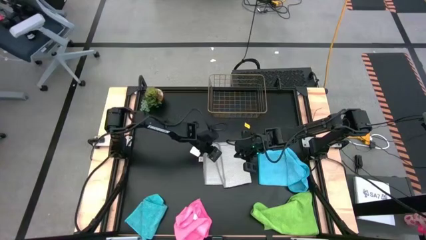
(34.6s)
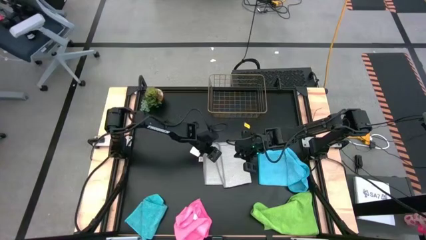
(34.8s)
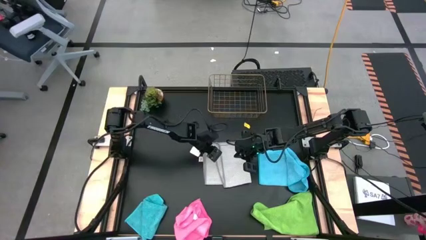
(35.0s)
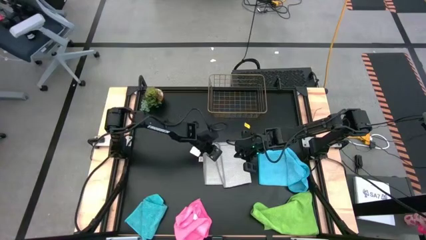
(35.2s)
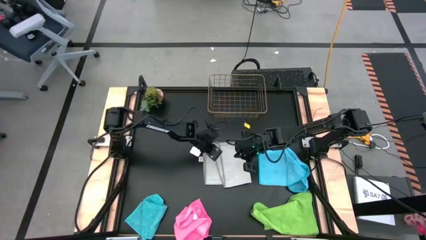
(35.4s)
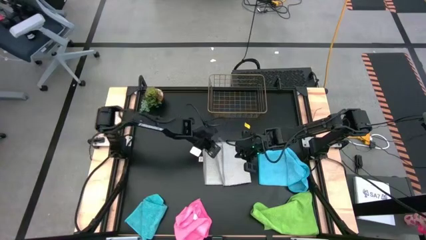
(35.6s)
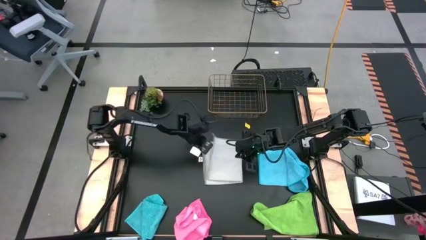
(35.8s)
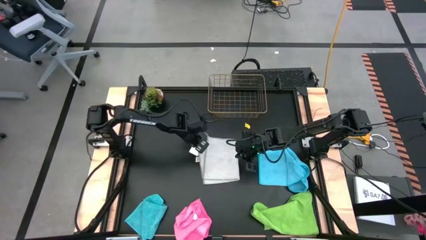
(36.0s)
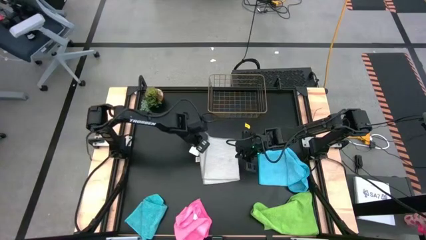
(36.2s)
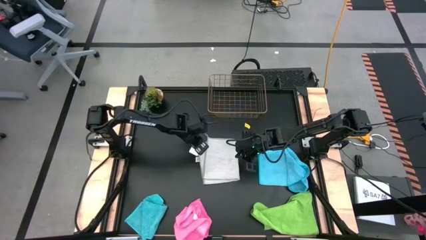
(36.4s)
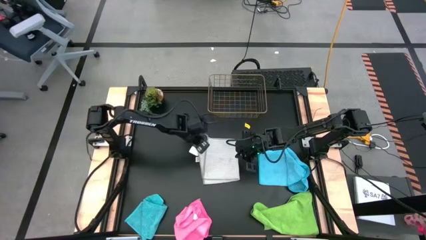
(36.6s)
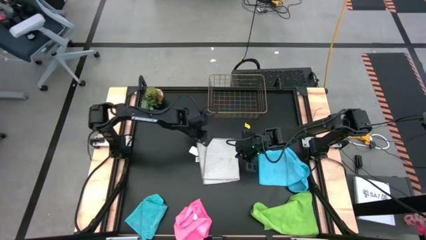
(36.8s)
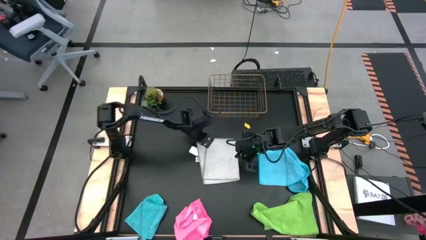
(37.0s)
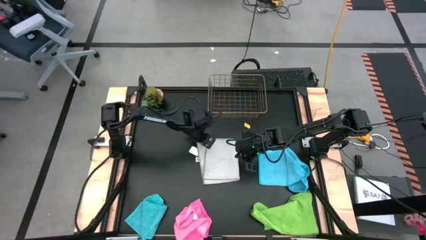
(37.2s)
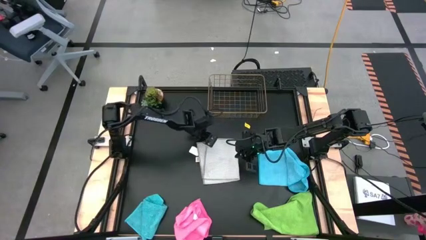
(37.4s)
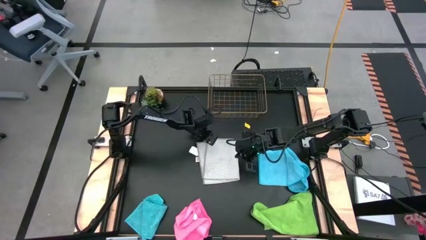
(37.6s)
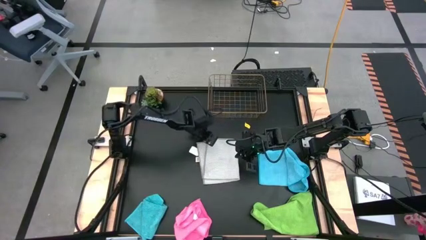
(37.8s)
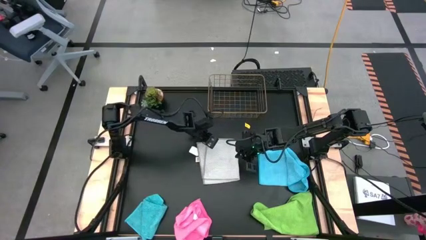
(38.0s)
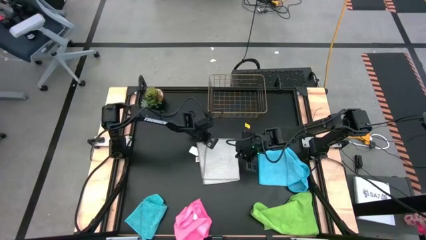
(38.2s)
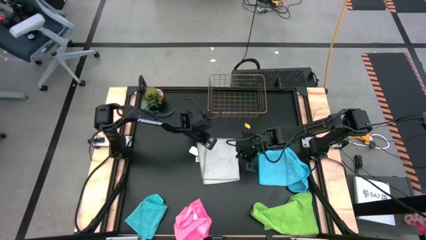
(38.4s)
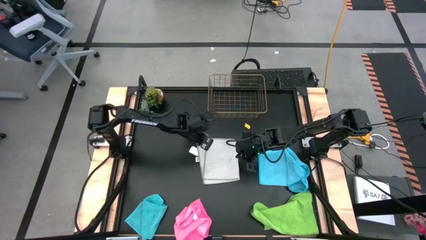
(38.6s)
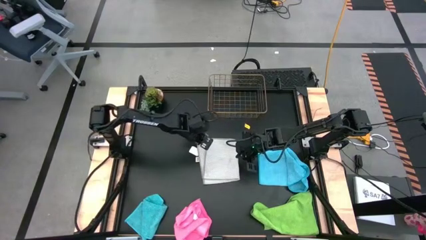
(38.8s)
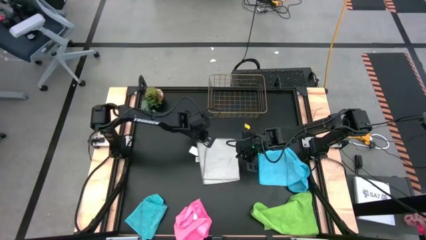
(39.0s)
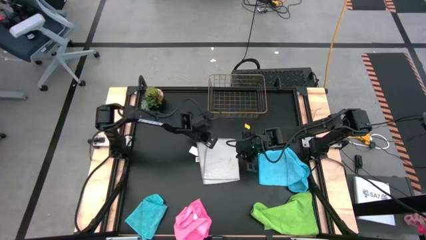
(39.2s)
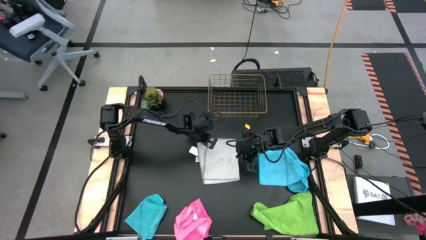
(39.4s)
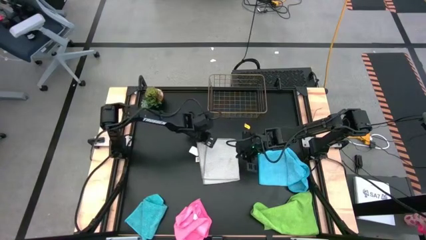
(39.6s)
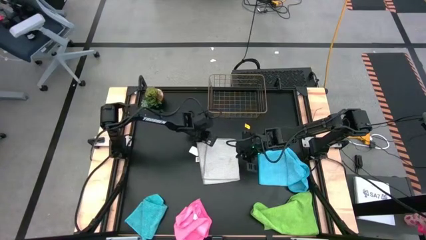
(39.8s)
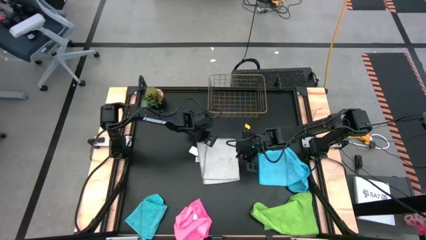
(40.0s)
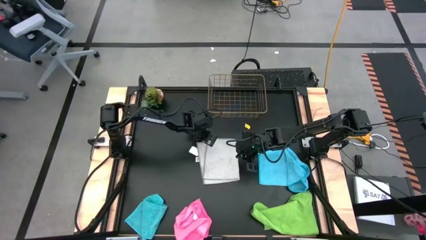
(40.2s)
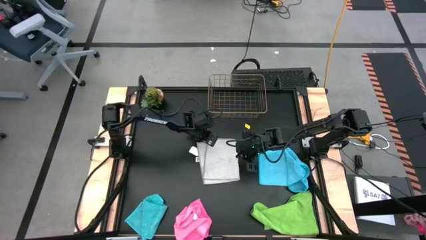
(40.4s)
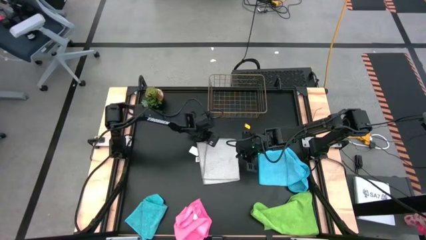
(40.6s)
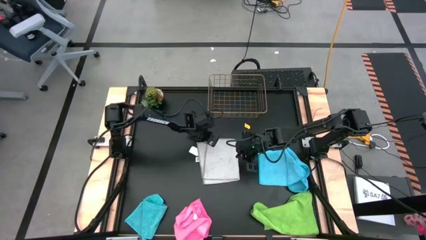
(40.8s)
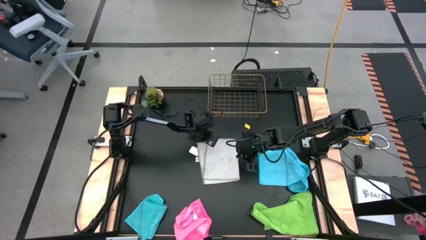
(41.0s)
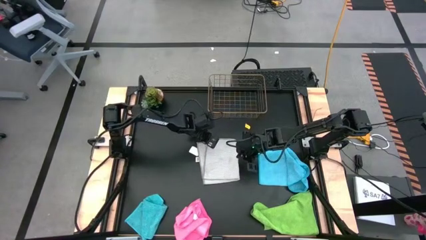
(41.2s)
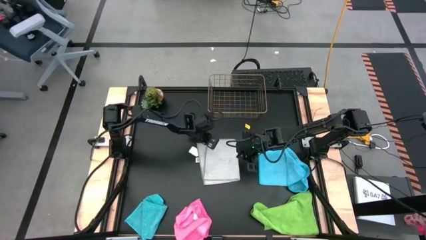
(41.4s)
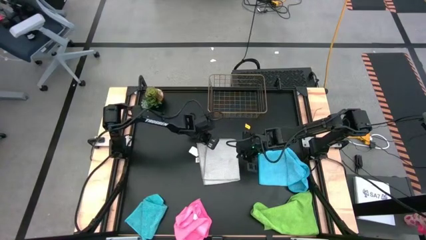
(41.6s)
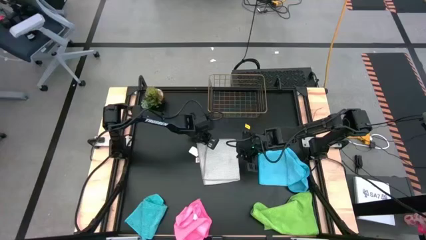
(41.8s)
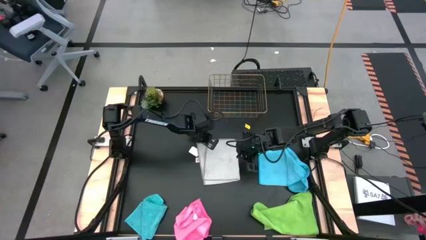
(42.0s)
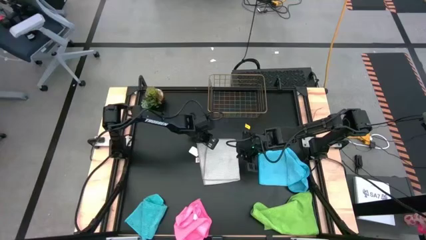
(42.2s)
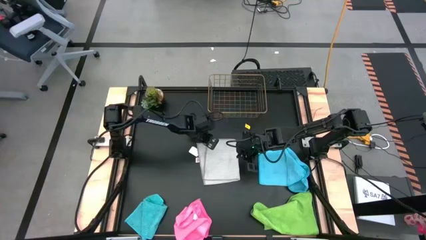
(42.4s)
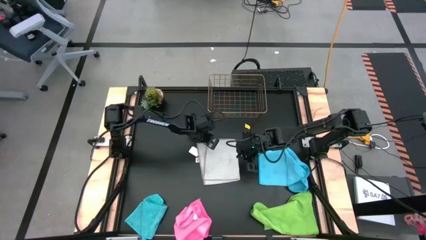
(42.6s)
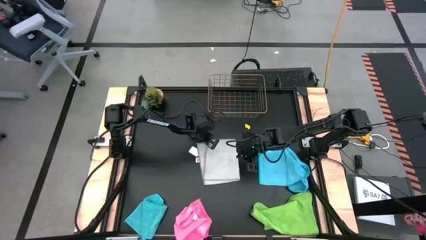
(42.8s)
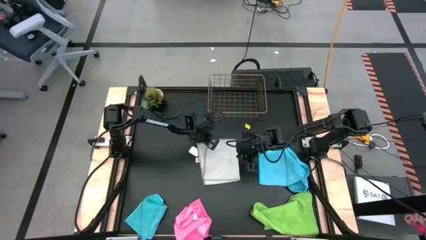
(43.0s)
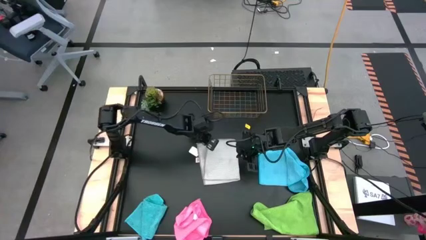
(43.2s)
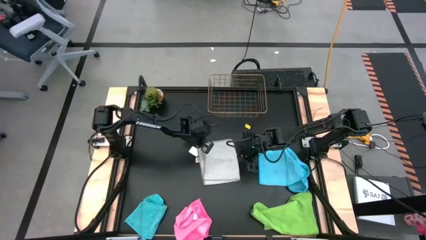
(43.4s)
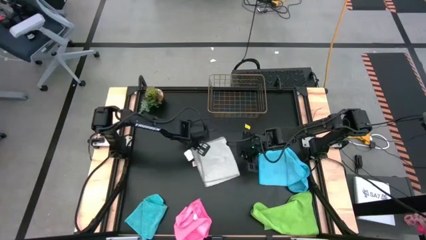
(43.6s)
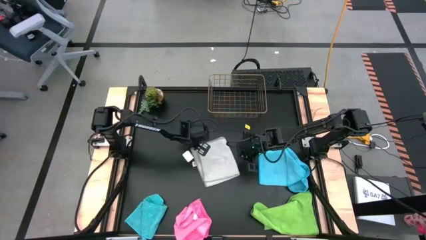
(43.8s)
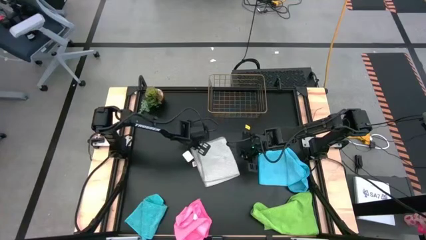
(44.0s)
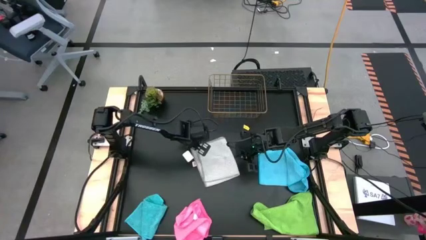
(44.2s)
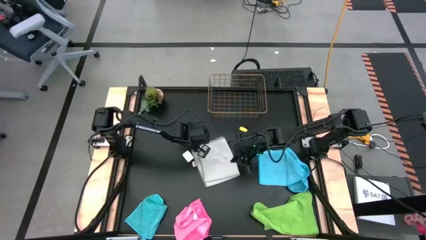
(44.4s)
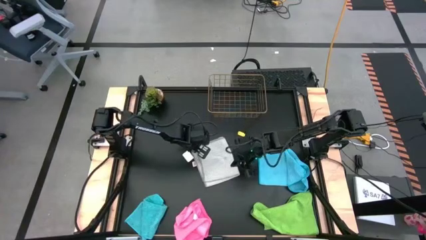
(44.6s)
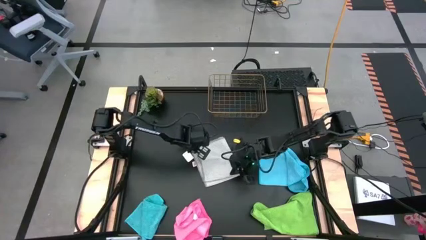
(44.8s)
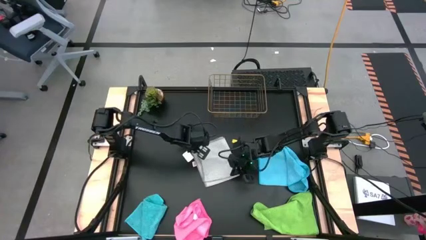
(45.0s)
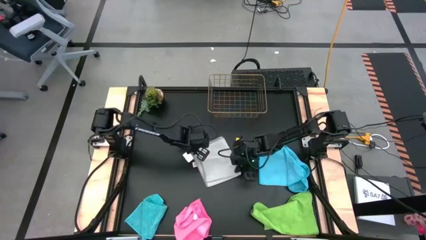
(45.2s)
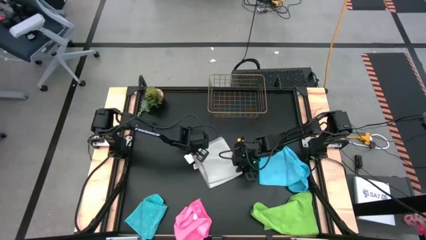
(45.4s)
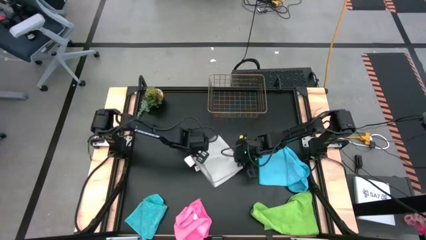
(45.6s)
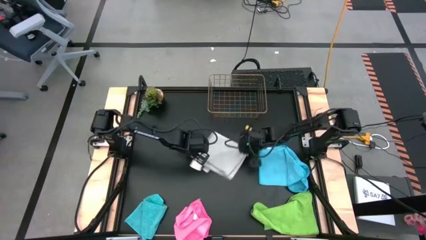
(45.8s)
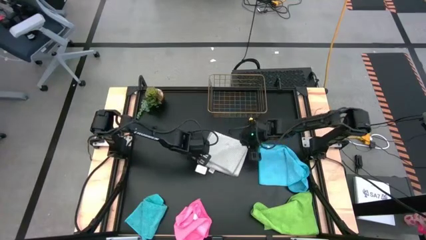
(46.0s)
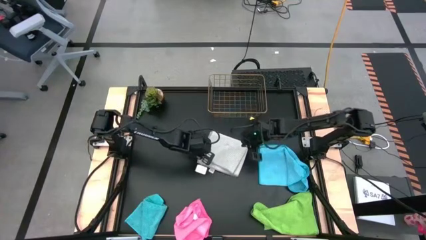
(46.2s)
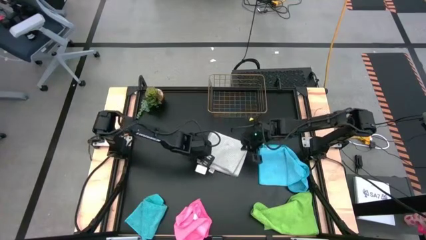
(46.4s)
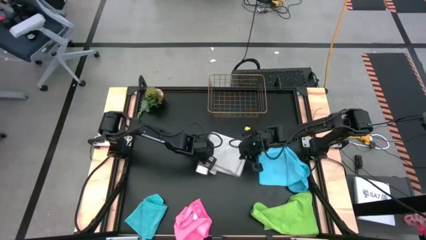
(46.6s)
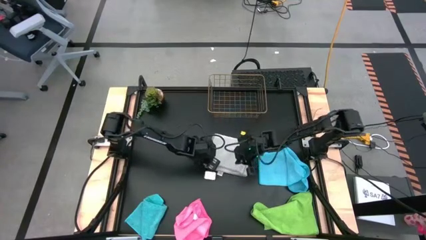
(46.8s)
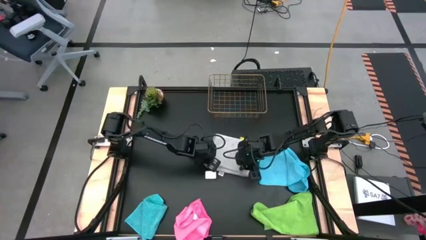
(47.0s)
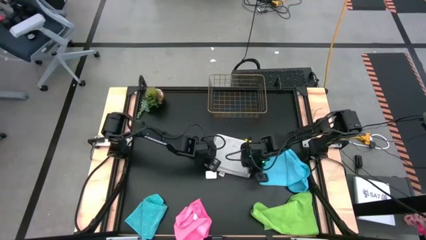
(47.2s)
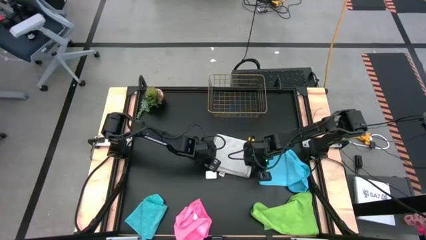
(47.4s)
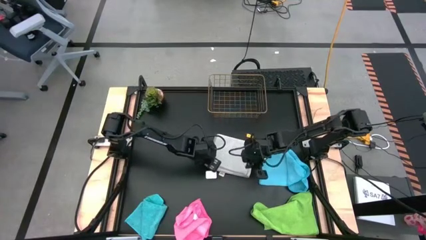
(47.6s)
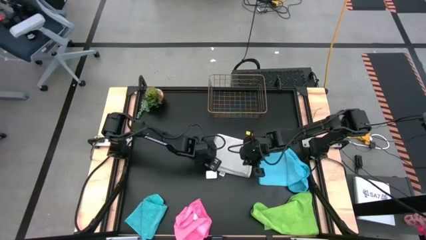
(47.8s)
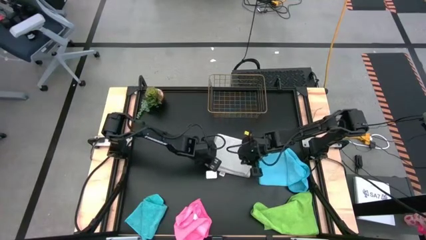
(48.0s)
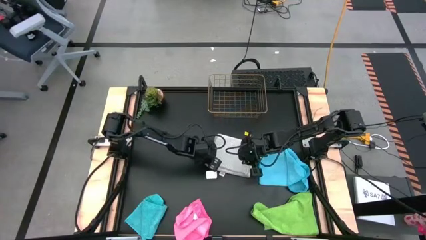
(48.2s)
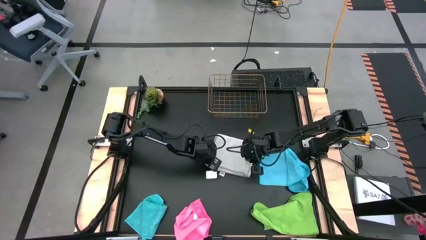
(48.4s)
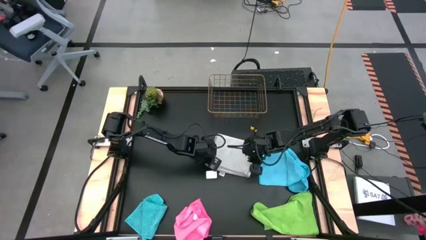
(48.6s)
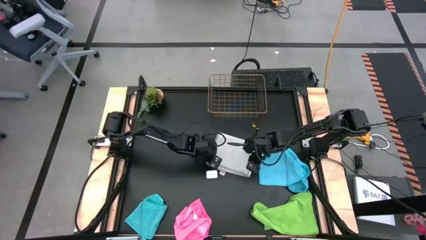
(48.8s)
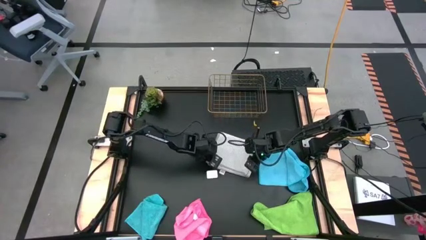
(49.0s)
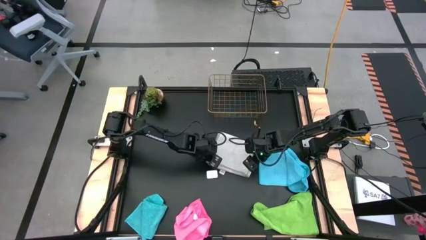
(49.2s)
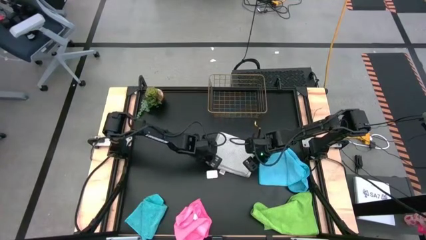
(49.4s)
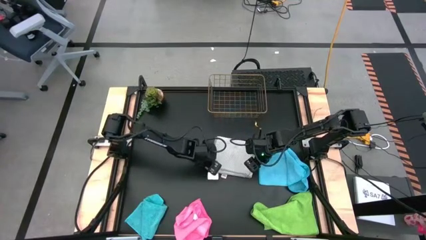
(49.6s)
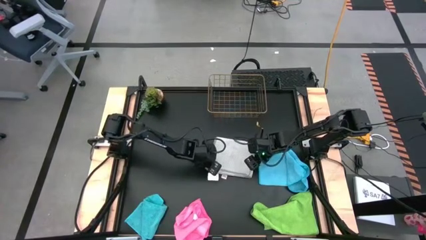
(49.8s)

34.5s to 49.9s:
Task: Fold microfiber towels
Fold the gray towel
